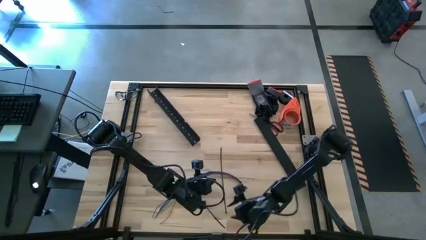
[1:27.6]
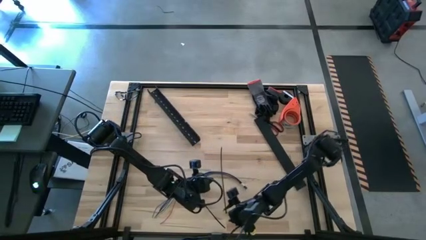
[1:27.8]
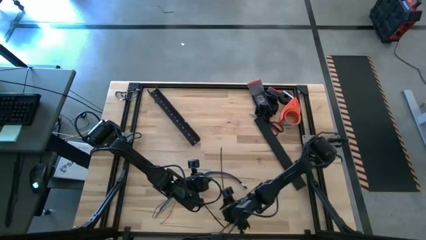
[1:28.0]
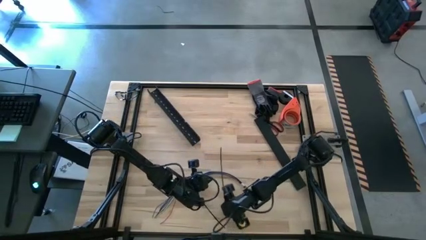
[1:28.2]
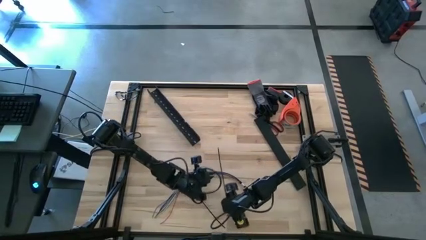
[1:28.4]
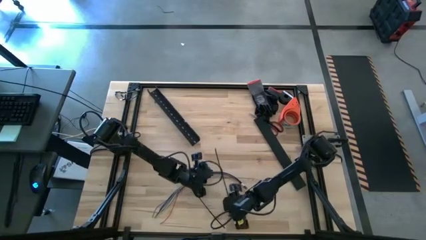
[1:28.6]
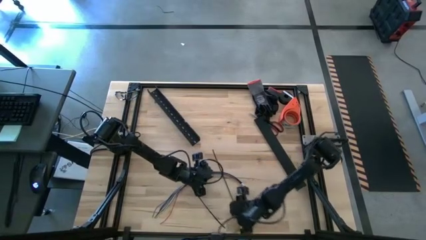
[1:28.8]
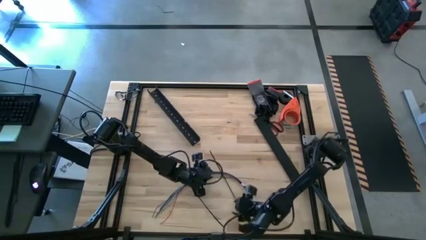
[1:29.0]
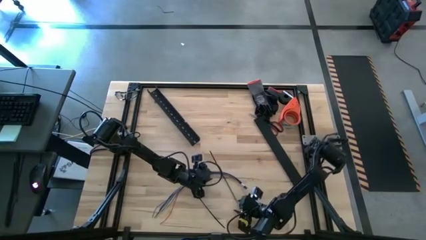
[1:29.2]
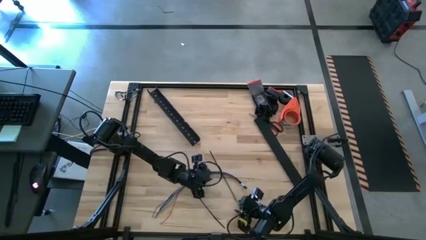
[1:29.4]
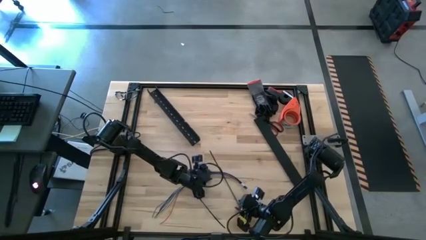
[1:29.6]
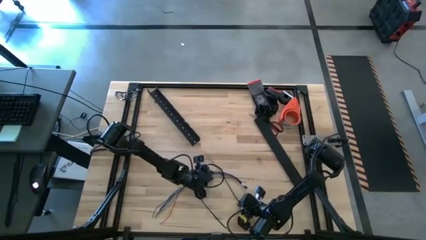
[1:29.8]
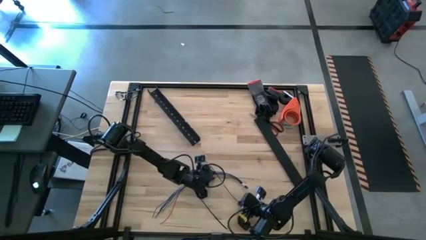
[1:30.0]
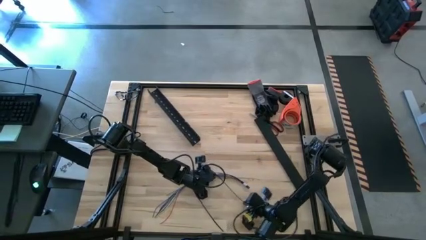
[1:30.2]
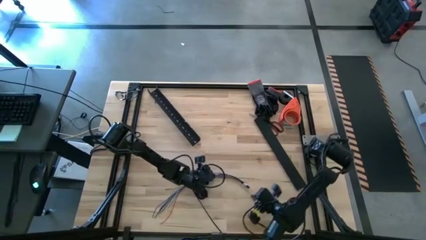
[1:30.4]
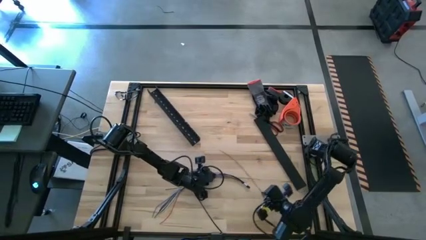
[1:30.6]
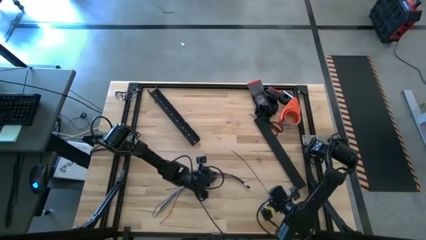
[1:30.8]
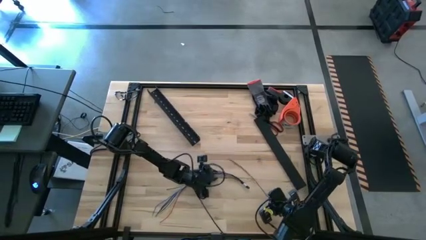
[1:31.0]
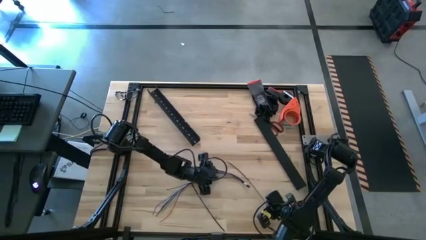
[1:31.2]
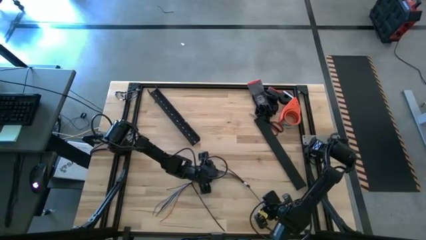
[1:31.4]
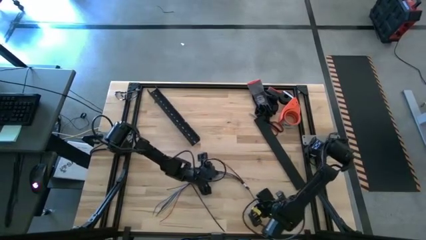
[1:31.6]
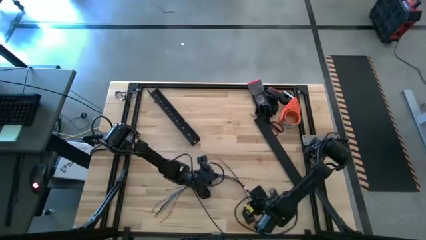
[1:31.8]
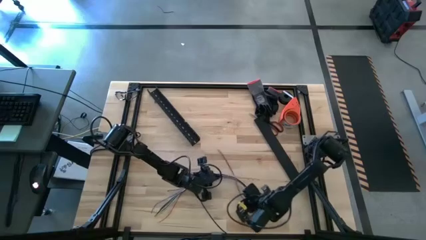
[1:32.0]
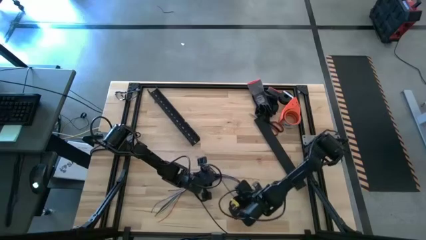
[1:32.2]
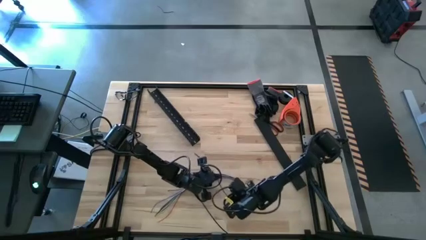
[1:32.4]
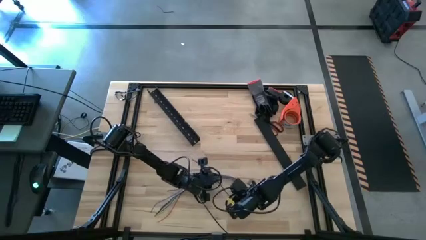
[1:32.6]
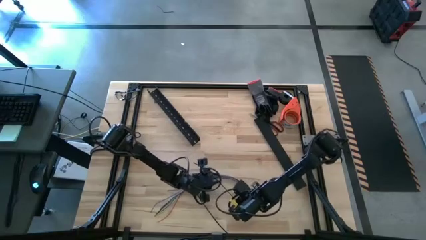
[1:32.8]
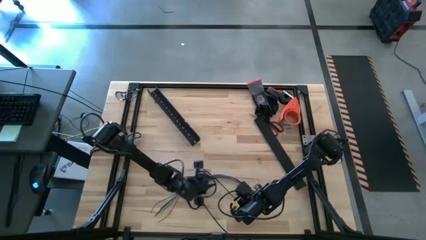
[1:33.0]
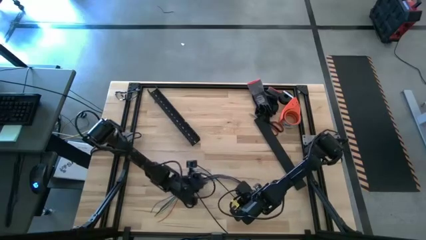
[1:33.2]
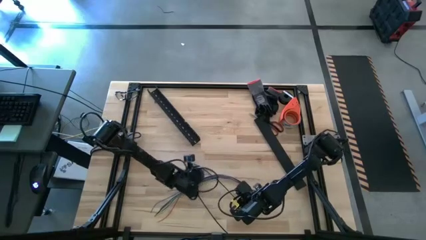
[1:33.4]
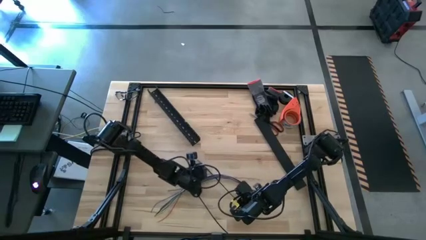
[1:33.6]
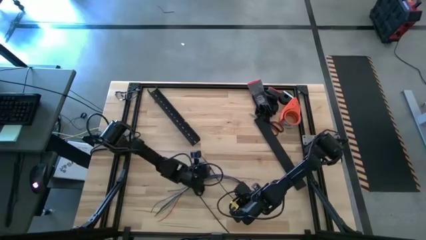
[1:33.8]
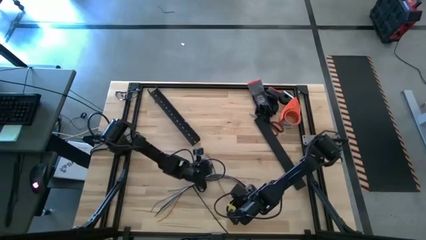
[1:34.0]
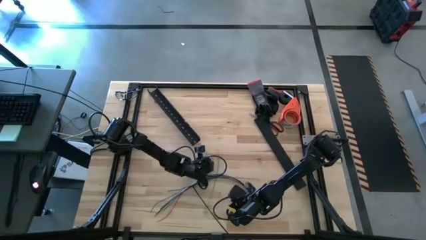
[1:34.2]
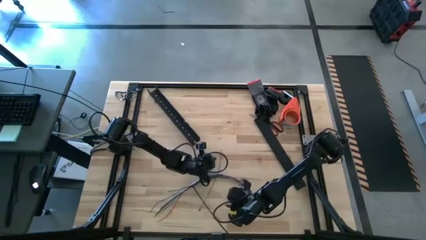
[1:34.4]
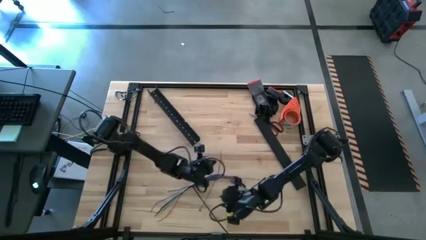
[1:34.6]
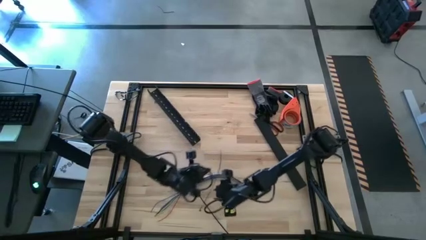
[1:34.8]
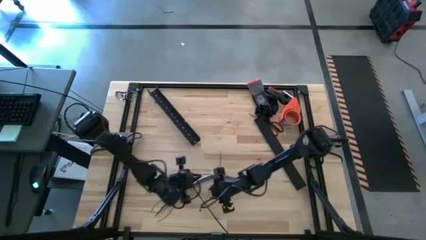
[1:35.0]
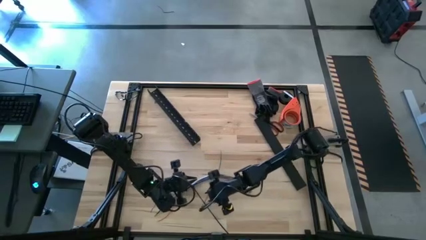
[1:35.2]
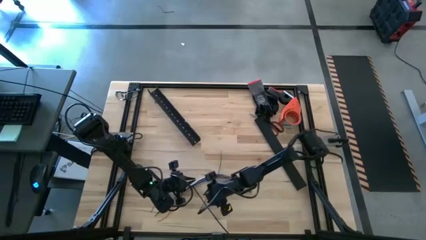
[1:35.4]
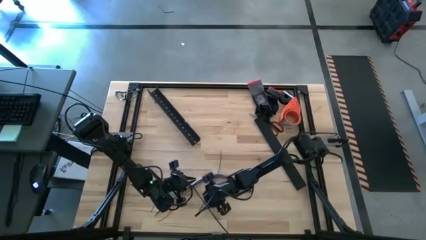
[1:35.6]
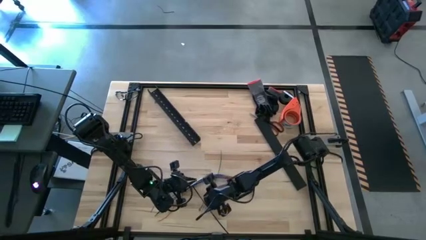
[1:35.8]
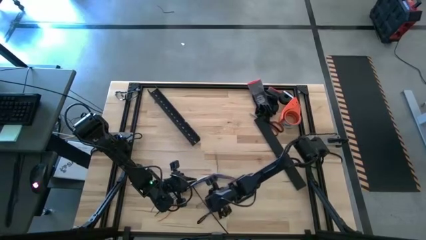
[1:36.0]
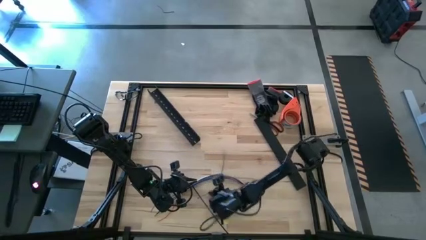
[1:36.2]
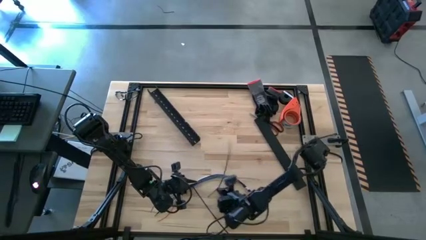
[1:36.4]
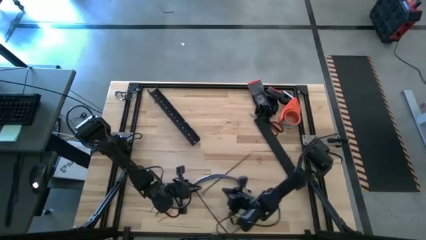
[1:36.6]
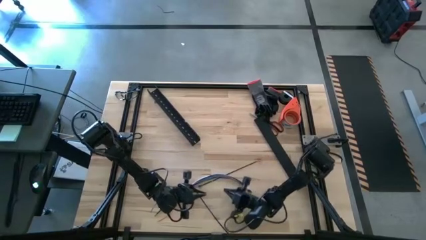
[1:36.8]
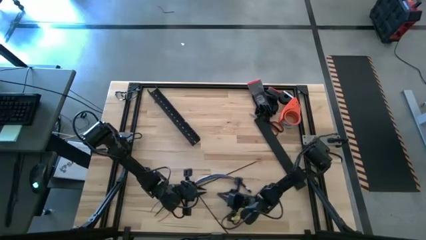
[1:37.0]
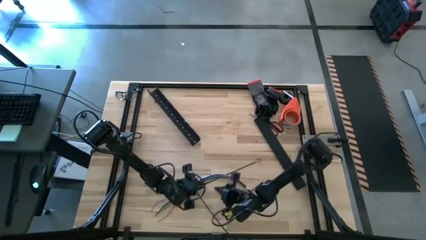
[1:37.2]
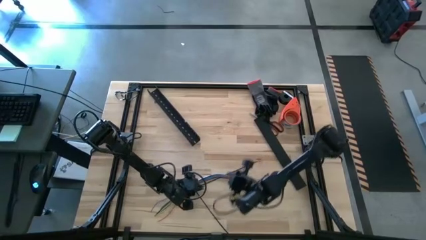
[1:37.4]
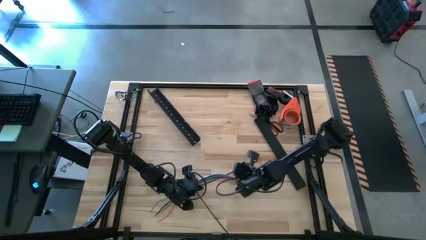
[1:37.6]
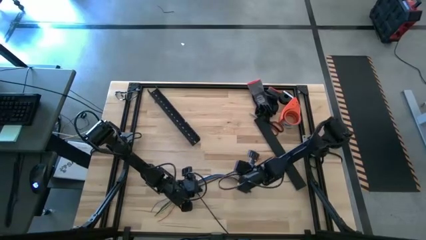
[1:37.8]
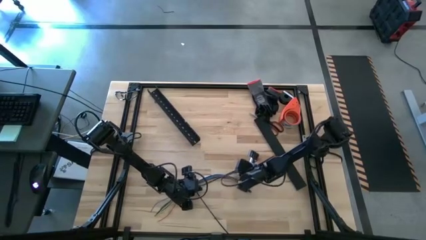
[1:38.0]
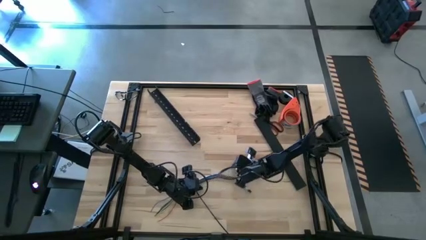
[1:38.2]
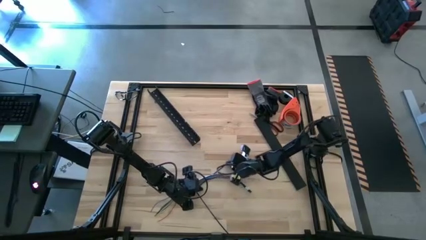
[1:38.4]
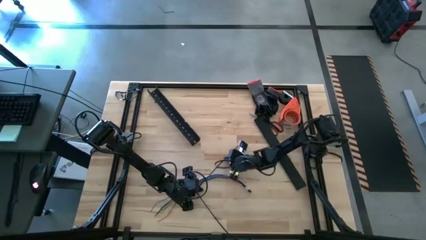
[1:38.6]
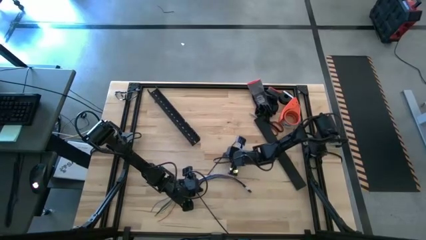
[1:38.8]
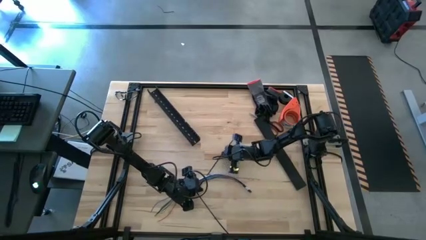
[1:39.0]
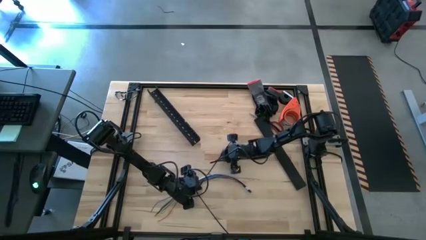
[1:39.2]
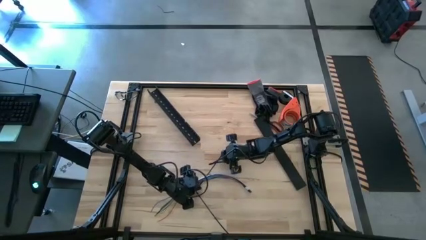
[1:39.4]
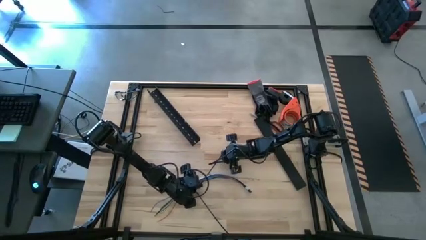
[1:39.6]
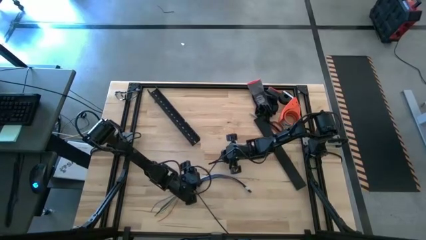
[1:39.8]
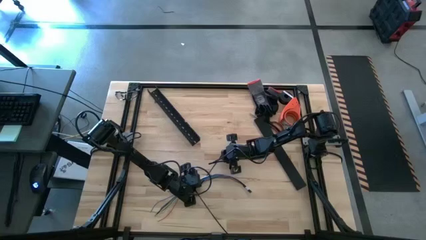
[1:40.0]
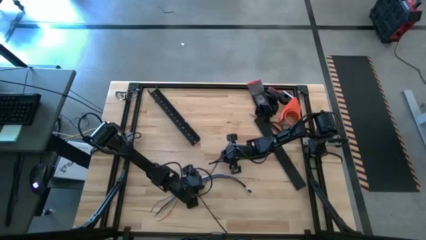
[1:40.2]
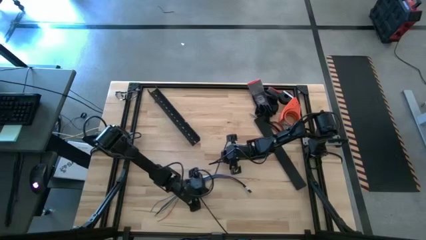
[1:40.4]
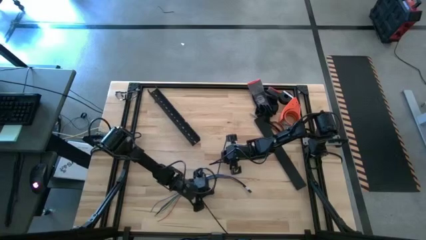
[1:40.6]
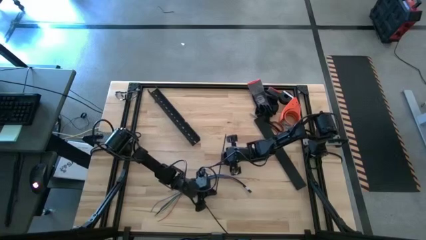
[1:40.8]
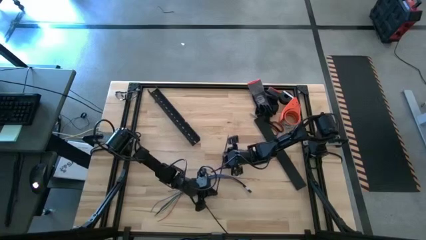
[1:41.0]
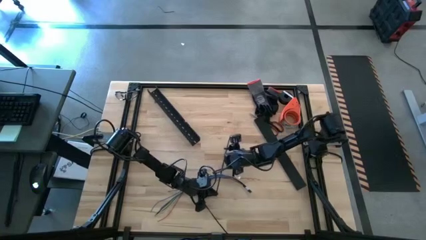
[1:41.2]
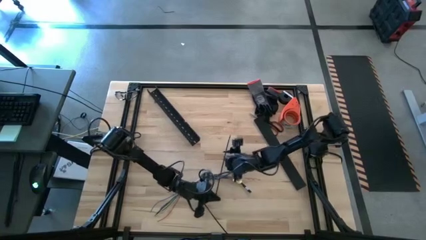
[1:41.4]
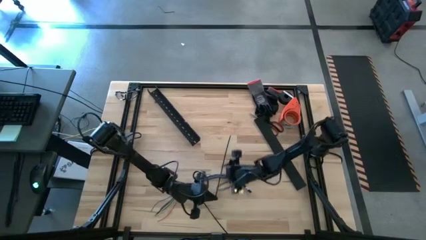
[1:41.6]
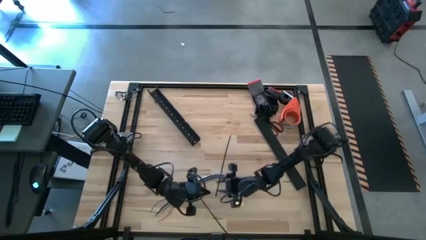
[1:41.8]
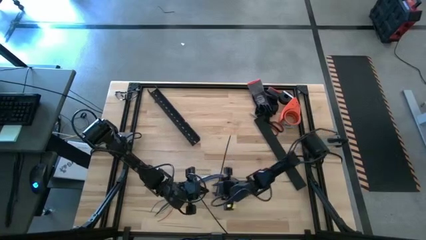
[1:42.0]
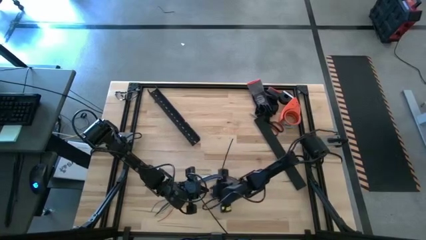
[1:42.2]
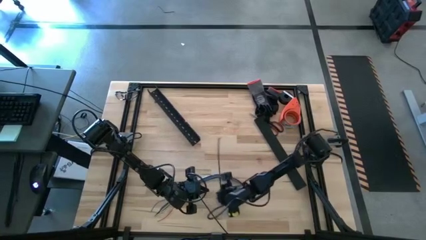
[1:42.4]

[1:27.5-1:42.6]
Task: Ziptie cables
Wrap the cable wires with the black zip tie
